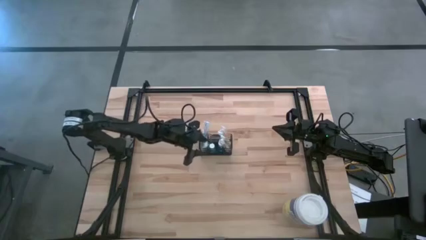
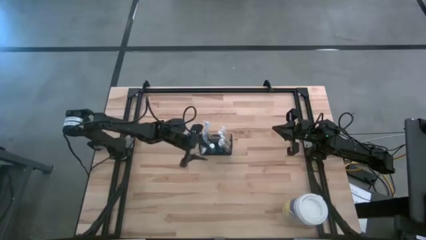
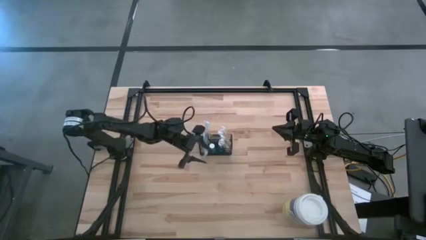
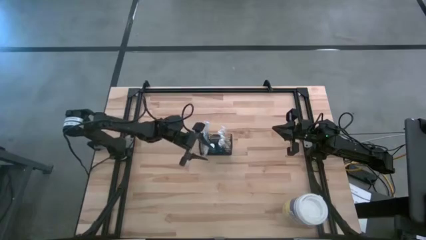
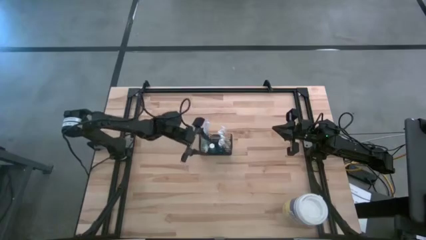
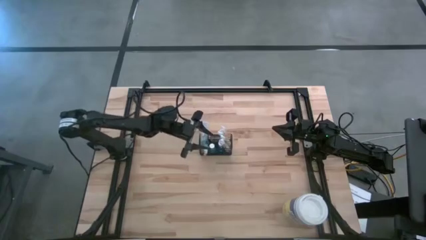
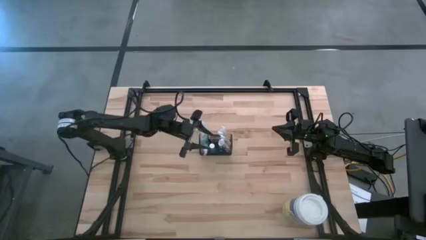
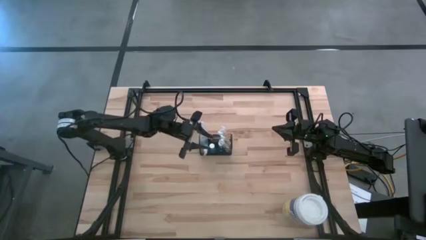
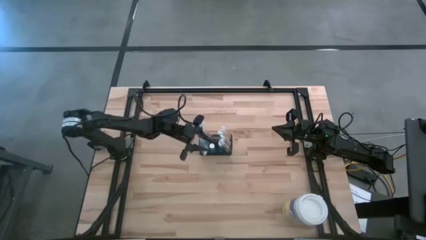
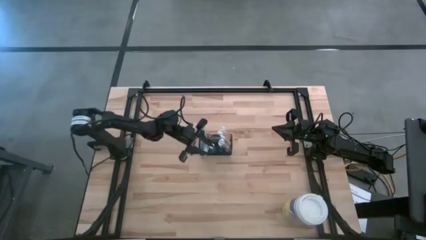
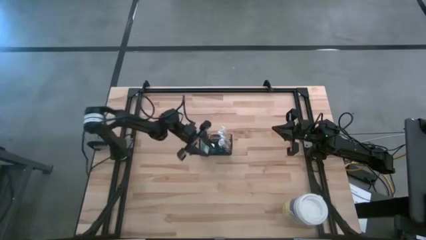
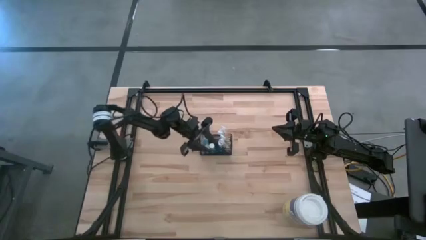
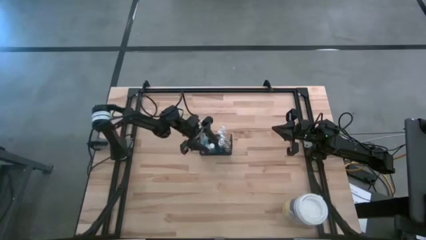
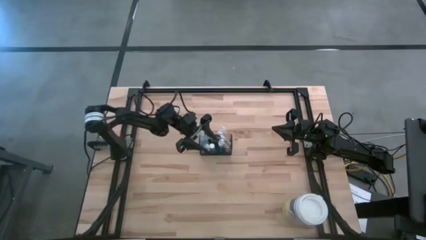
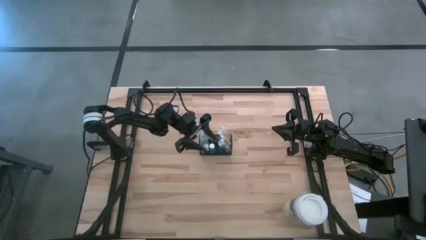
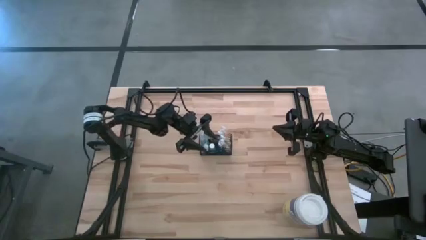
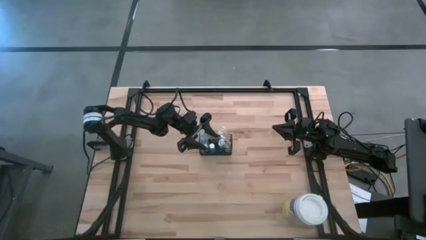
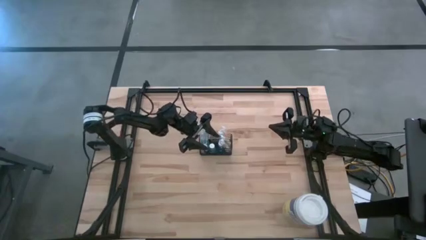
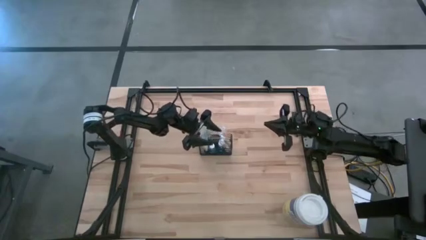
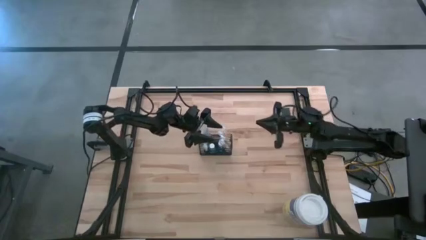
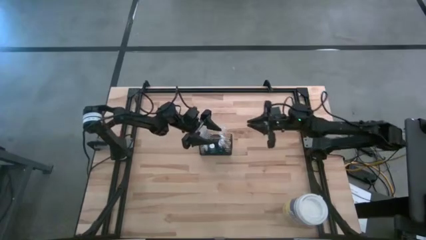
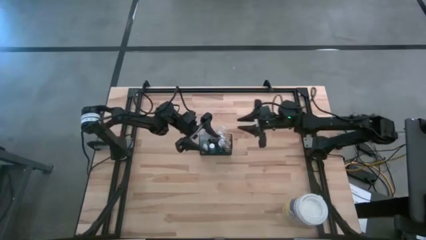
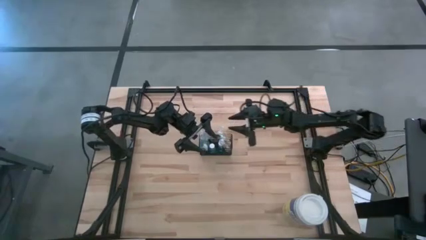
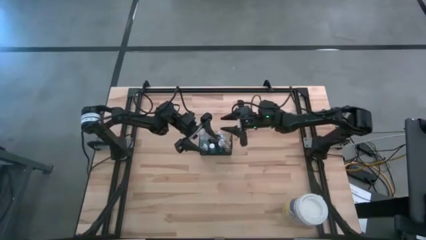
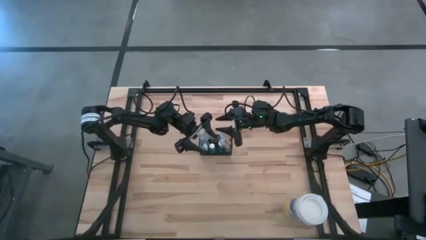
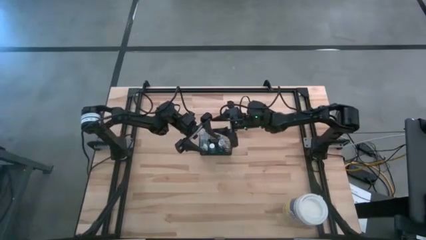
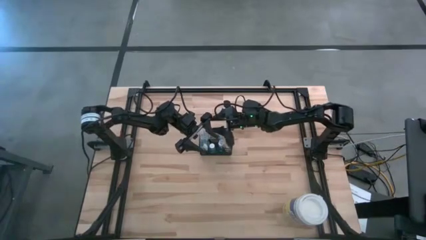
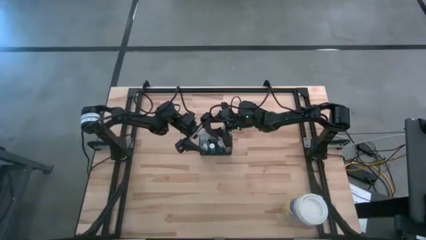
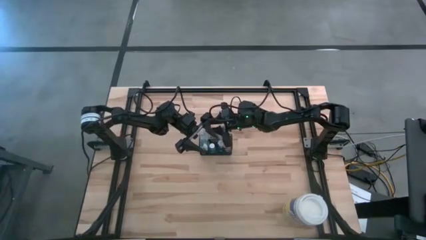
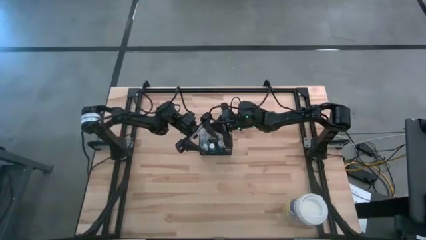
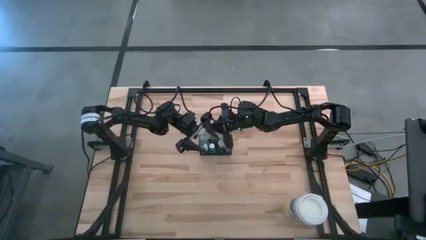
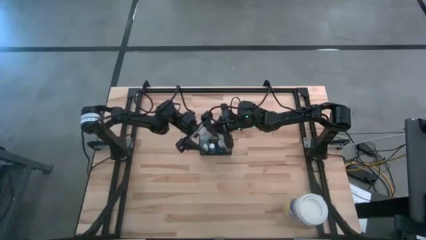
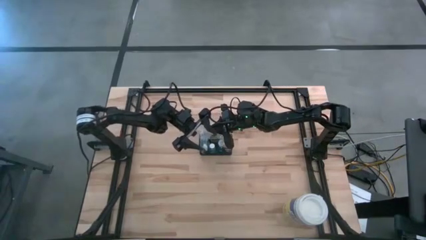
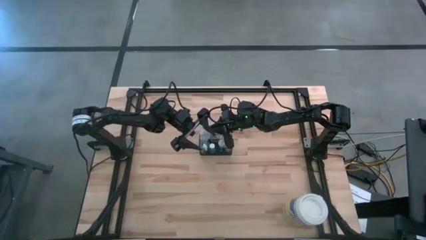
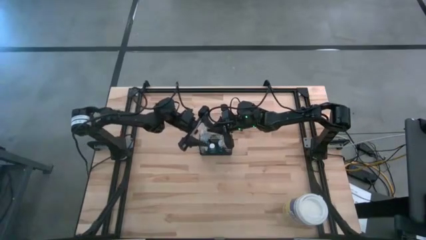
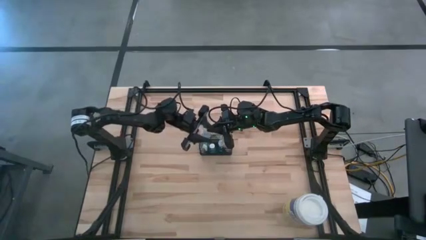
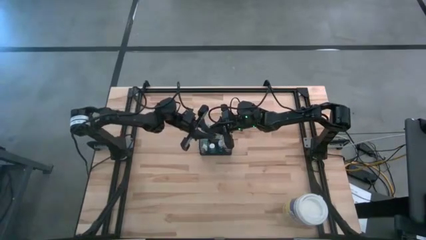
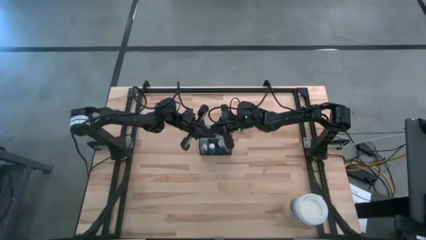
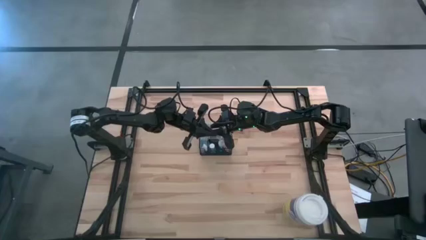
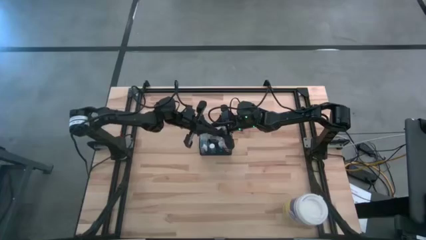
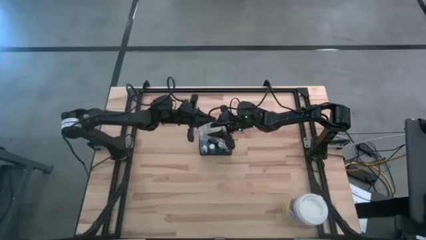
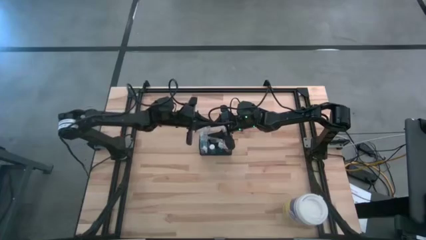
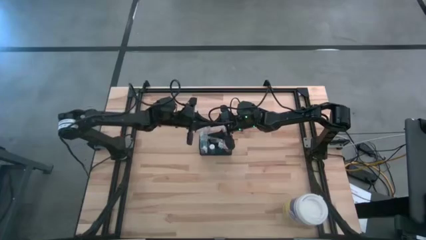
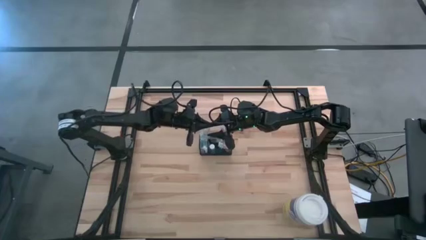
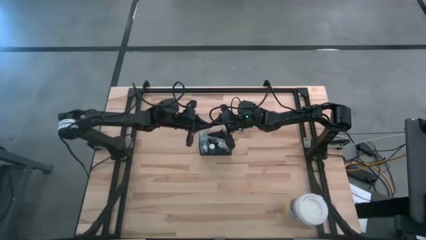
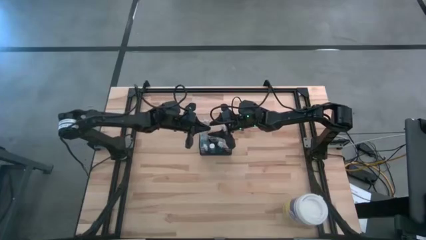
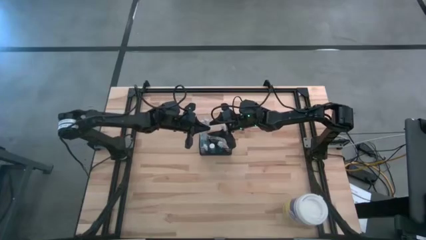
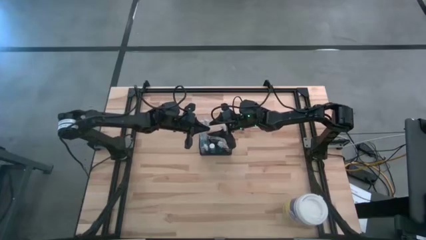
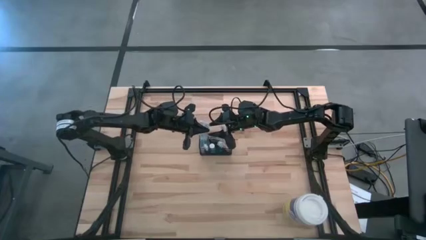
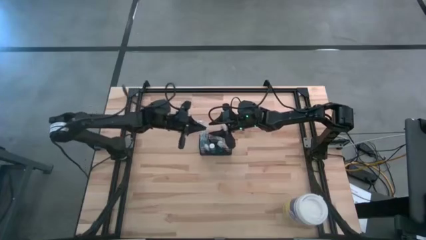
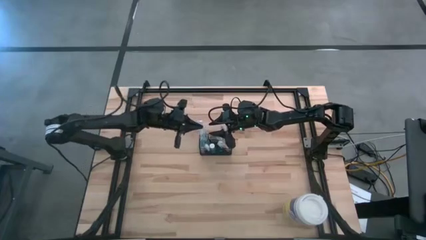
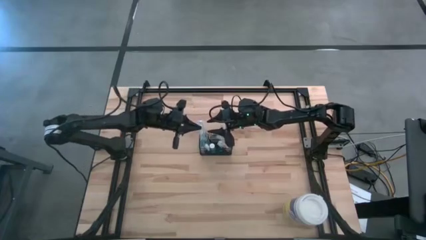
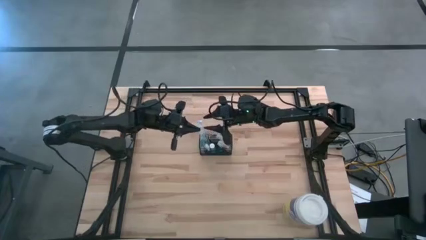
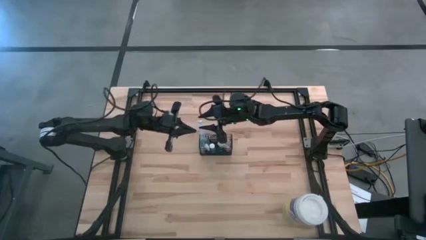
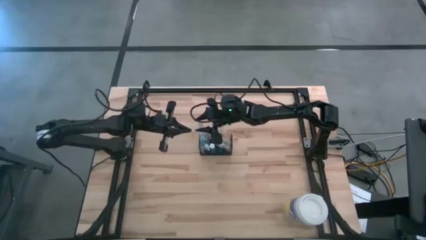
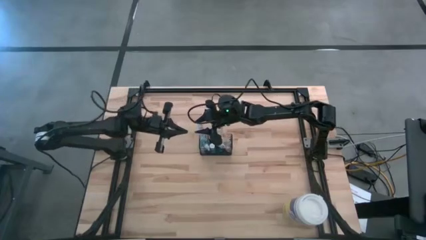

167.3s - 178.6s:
Task: Pick & Place toothbrushing station
Adjust the blue toothbrush
